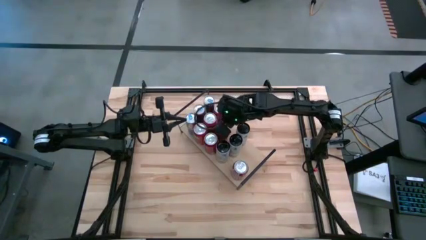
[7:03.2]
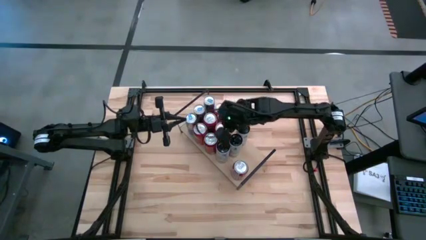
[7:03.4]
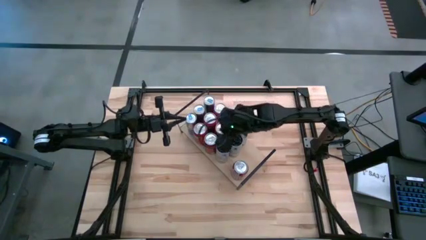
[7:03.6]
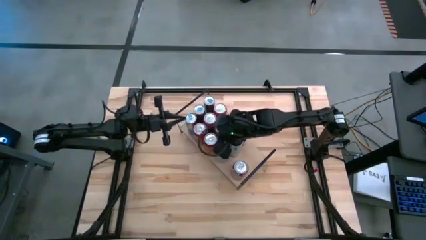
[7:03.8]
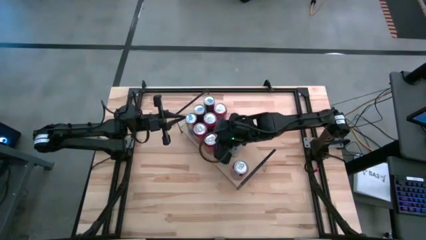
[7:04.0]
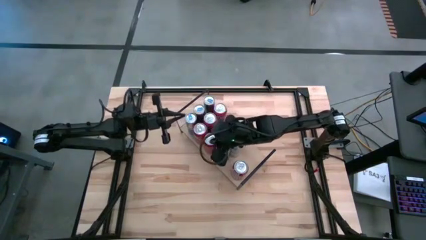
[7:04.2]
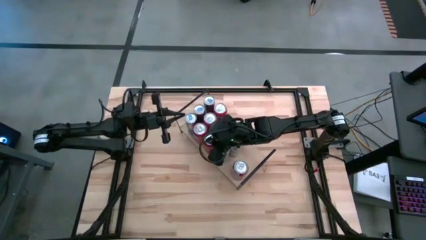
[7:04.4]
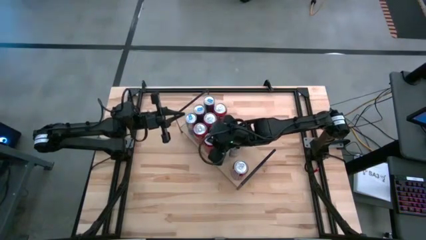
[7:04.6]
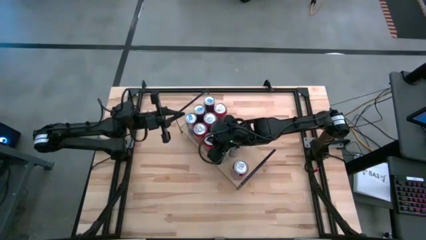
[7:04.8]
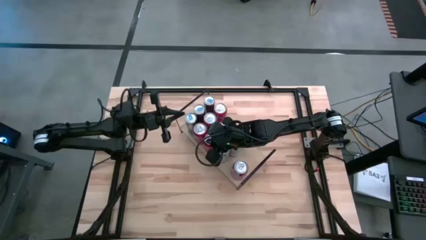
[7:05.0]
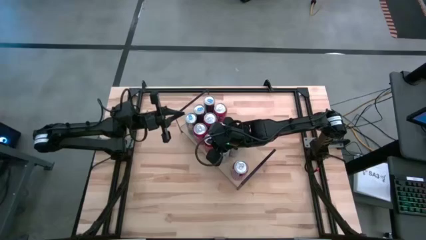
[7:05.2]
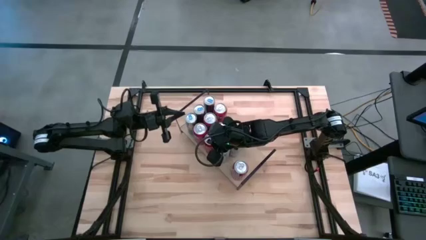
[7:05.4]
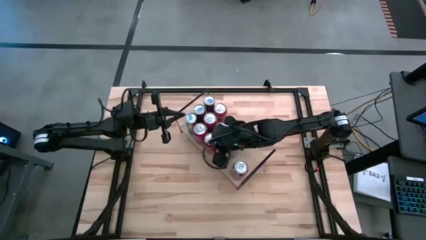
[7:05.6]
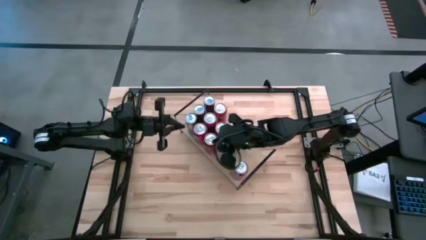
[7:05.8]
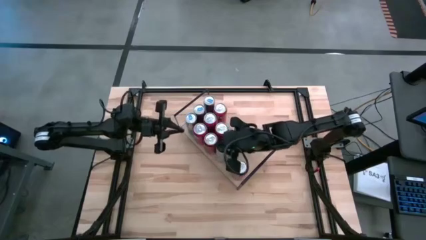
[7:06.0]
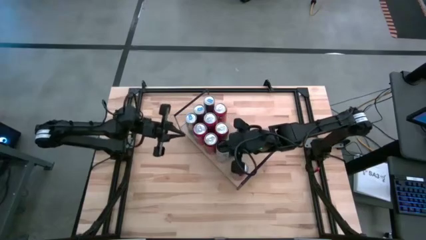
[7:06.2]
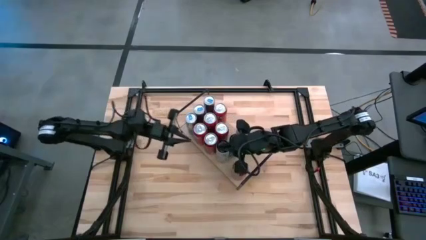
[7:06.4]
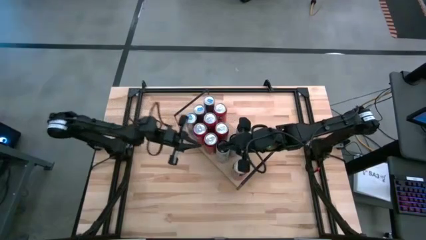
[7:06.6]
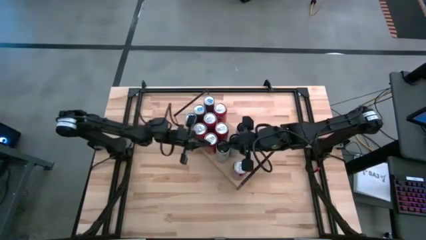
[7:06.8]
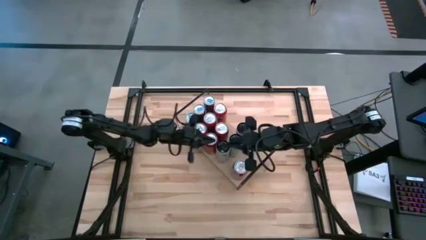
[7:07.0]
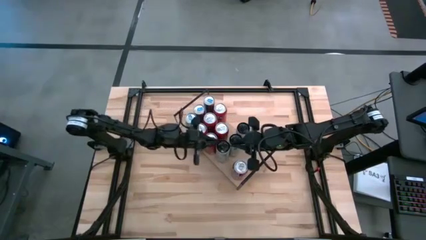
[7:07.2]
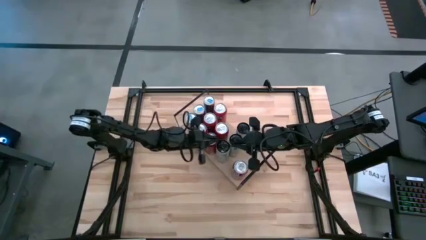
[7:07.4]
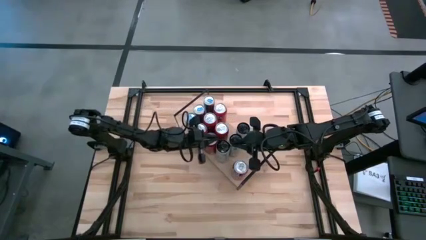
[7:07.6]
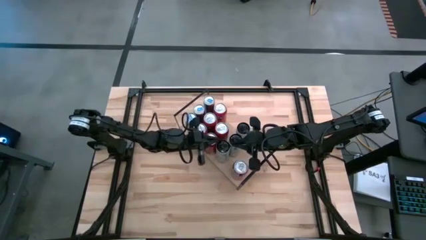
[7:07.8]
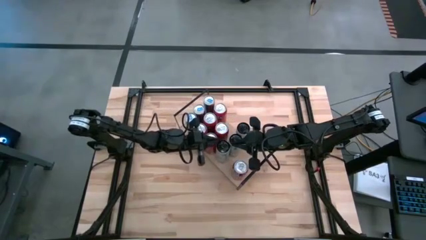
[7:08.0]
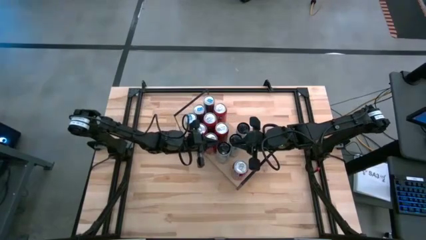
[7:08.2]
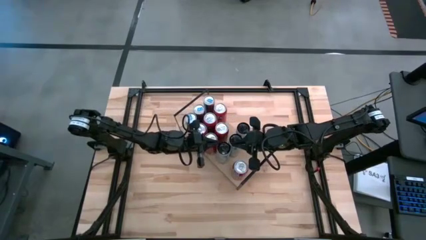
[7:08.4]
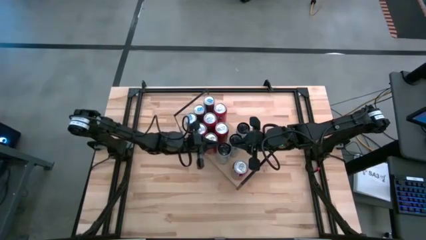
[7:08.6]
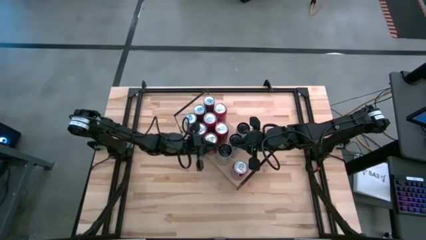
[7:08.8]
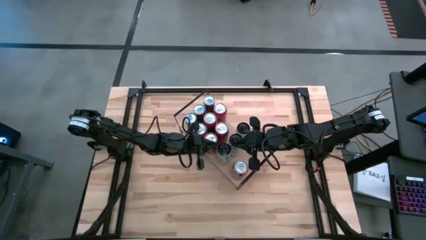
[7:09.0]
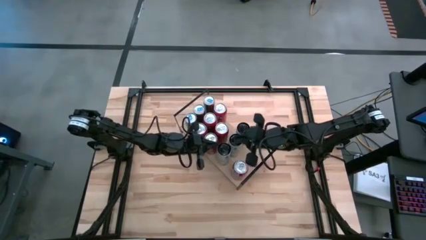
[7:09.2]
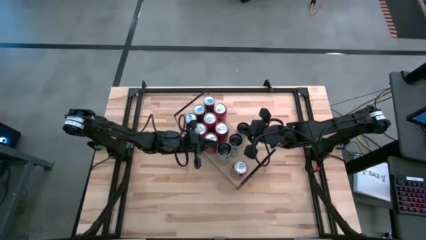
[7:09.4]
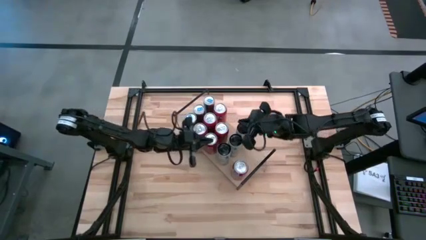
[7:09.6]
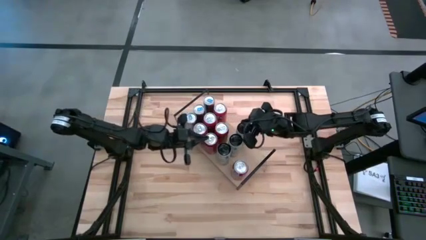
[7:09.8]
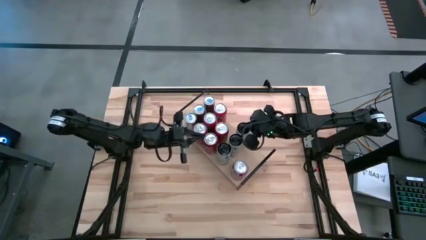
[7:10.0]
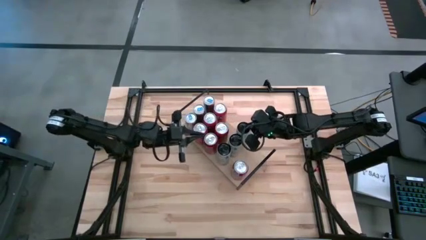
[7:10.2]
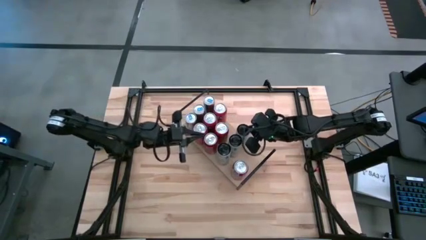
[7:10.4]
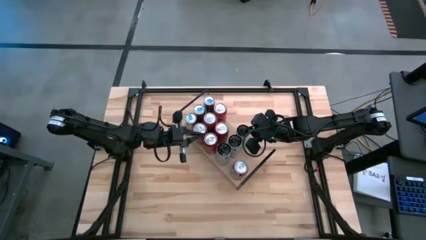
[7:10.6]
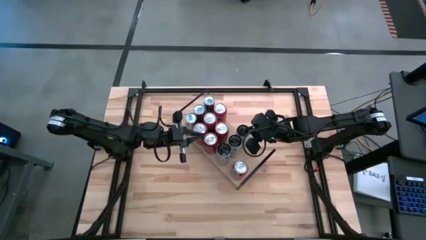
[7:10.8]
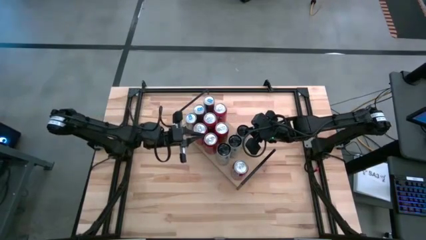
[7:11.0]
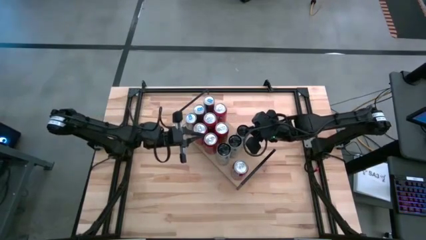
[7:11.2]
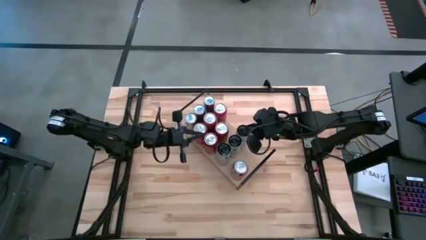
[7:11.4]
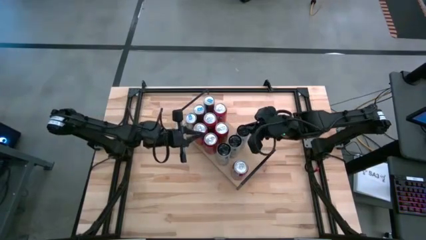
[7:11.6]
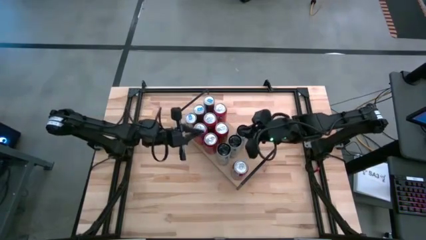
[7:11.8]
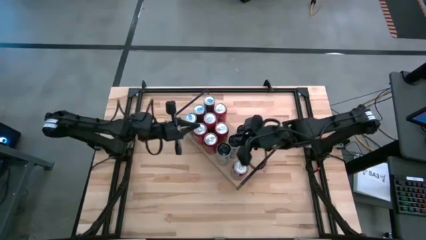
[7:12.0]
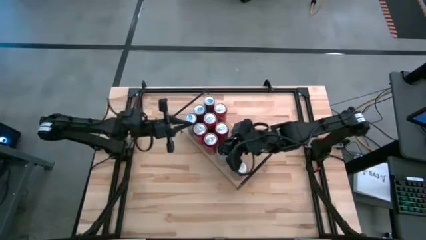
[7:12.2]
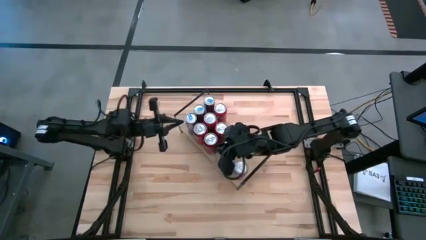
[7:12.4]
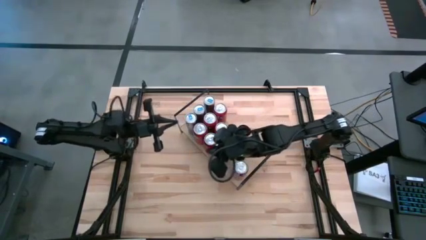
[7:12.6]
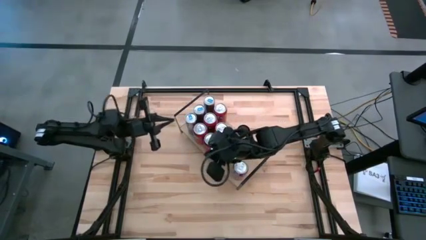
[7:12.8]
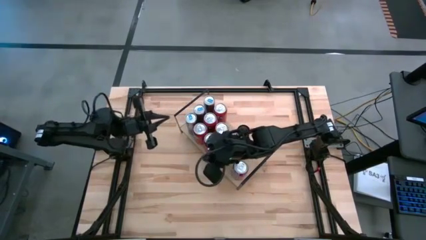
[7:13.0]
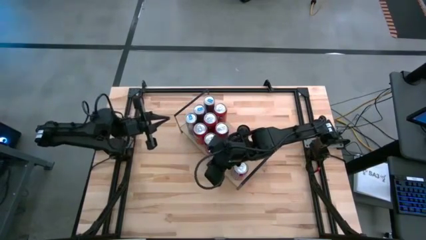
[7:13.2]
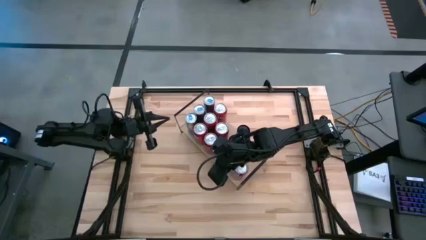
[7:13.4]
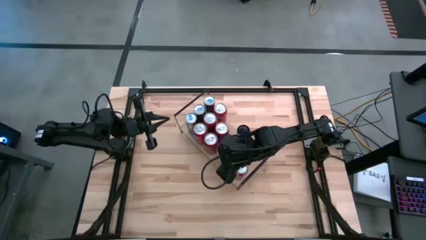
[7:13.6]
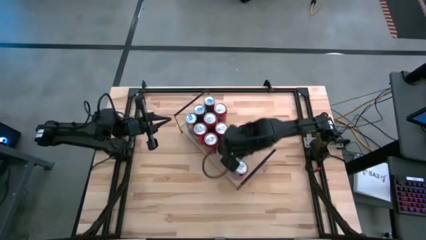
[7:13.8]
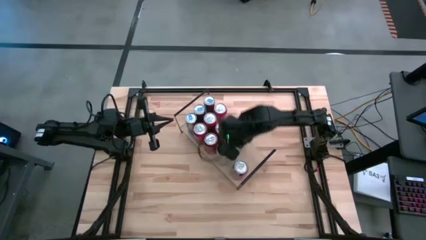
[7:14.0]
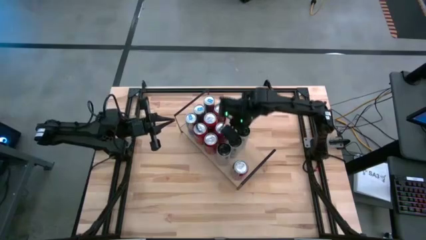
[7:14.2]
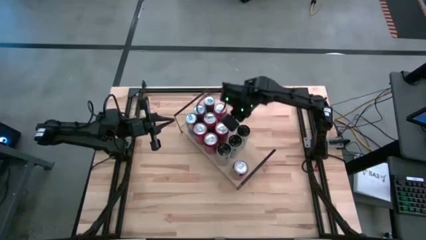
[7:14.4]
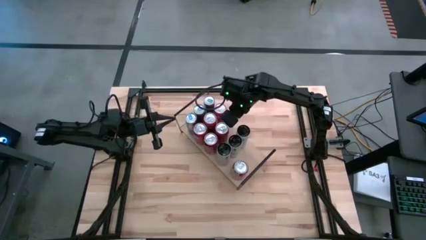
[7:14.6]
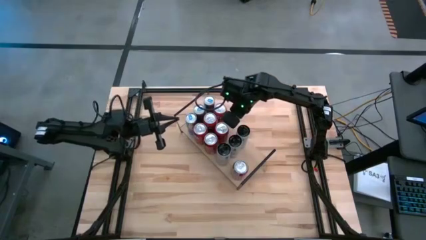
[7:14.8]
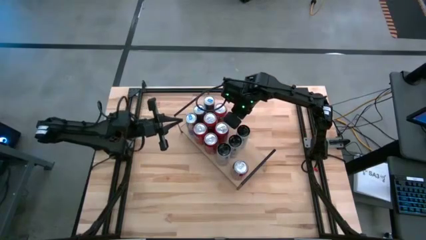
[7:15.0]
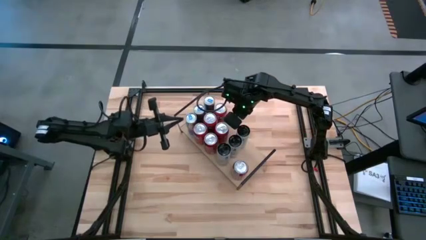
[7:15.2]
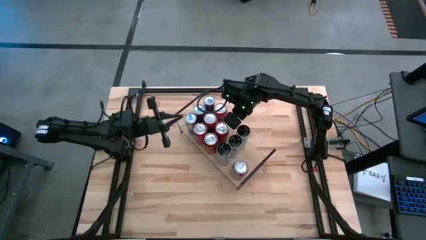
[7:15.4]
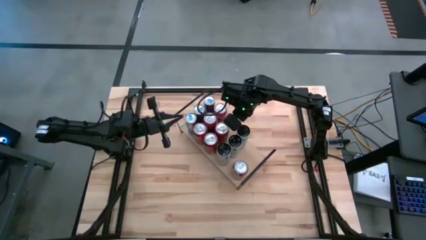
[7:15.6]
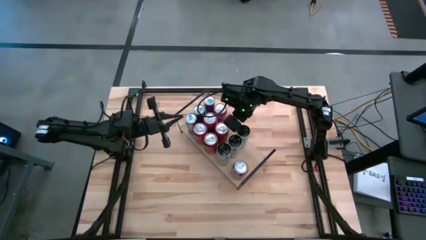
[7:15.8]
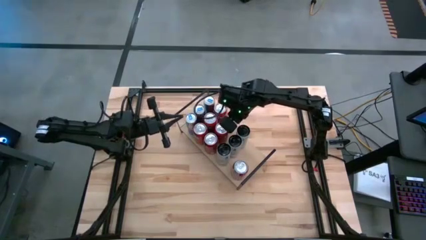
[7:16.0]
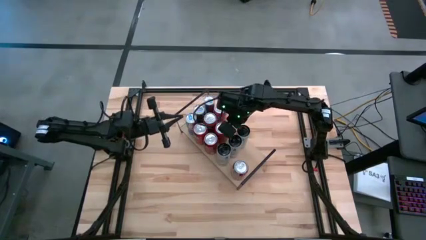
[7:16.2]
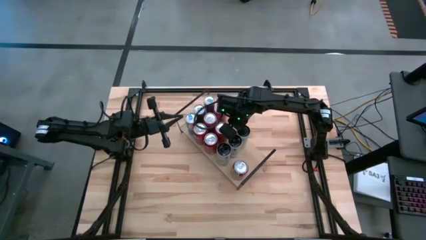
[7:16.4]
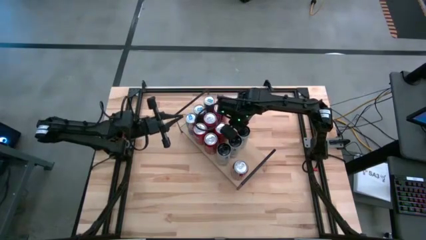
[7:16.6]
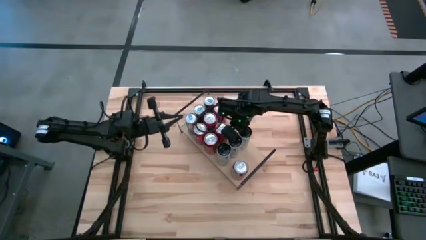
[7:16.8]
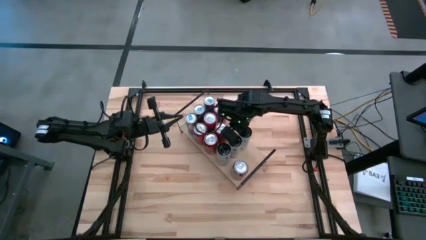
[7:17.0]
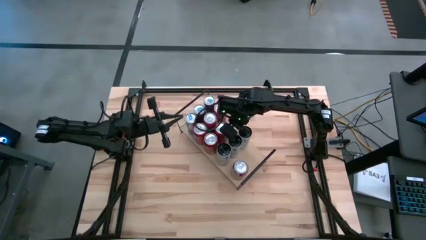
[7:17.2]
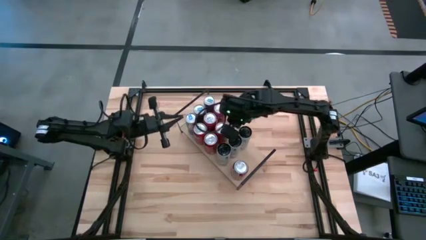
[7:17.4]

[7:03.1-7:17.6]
Task: Place canned beverage on shelf
Adjust the pink soda can
